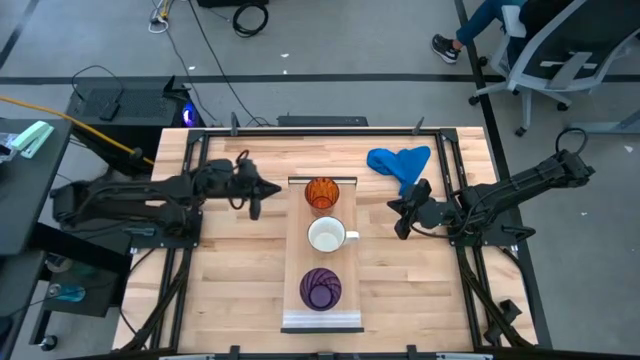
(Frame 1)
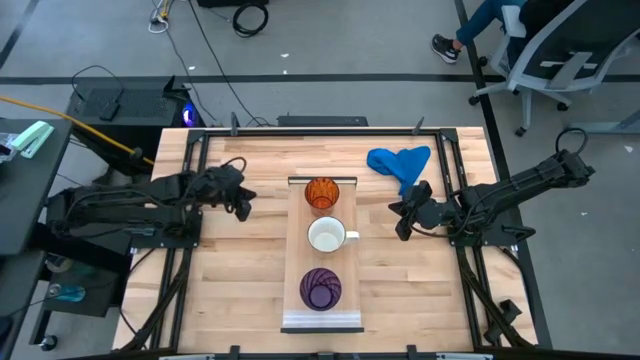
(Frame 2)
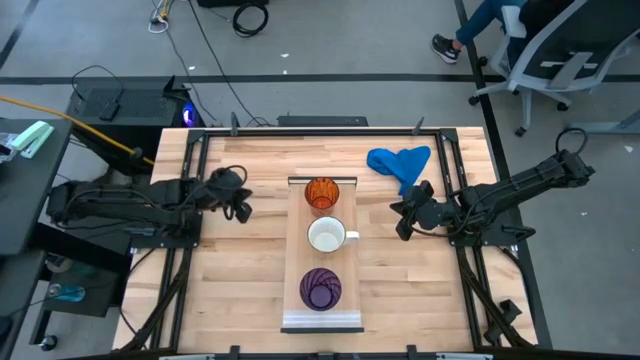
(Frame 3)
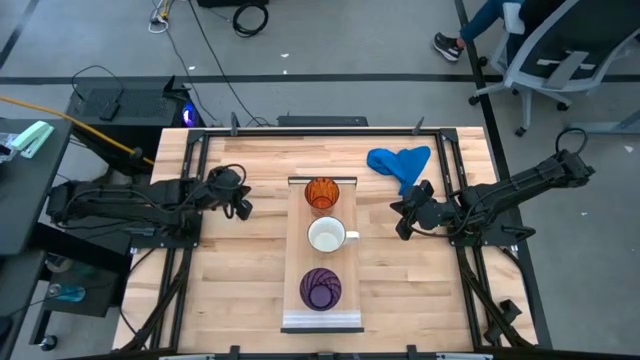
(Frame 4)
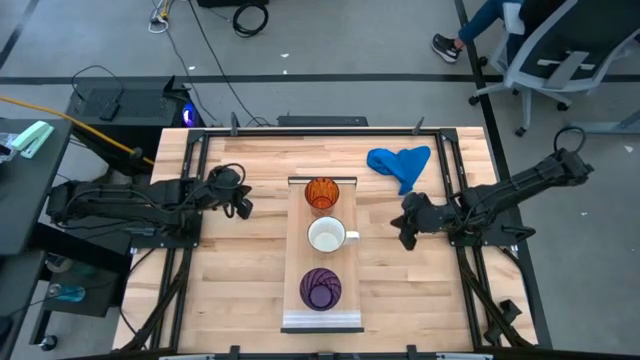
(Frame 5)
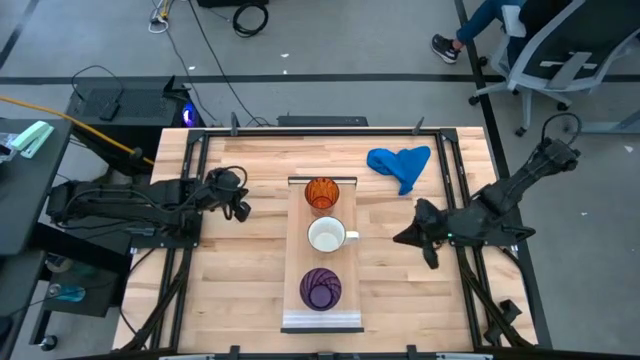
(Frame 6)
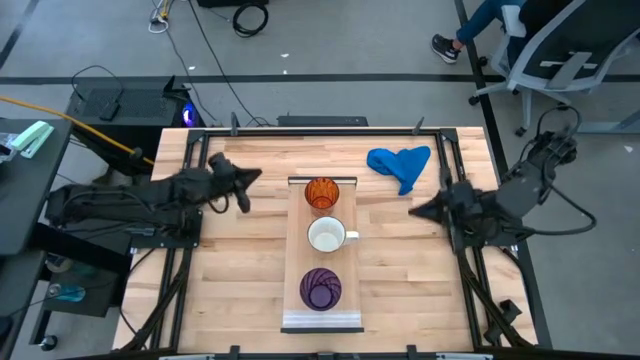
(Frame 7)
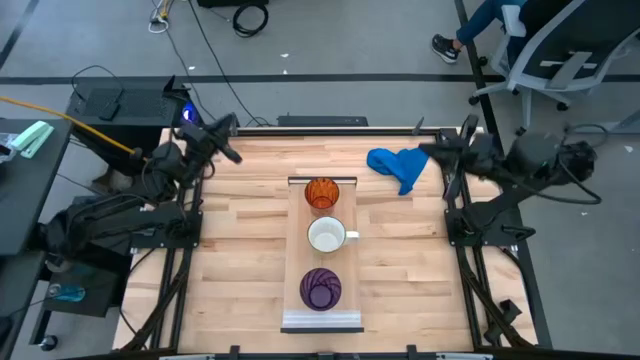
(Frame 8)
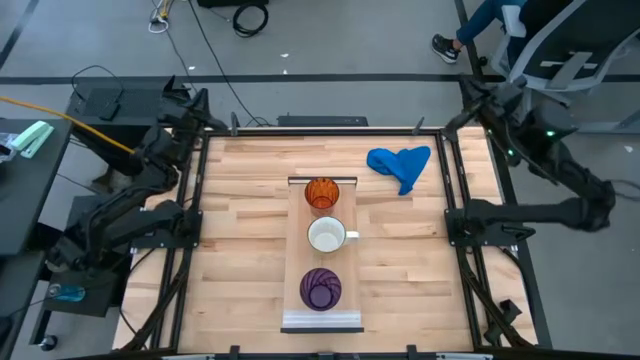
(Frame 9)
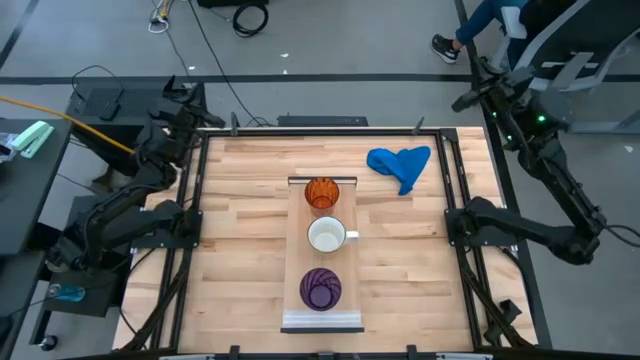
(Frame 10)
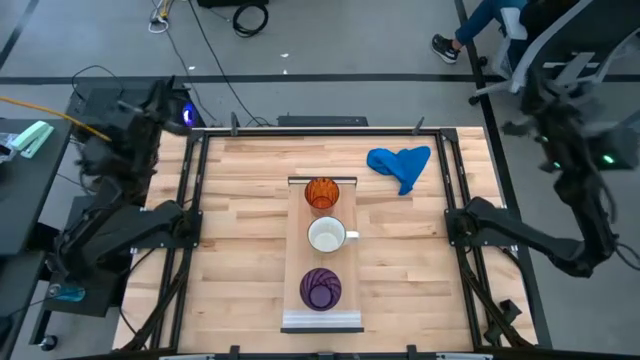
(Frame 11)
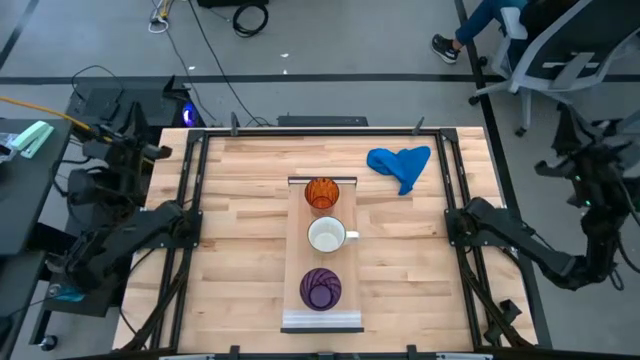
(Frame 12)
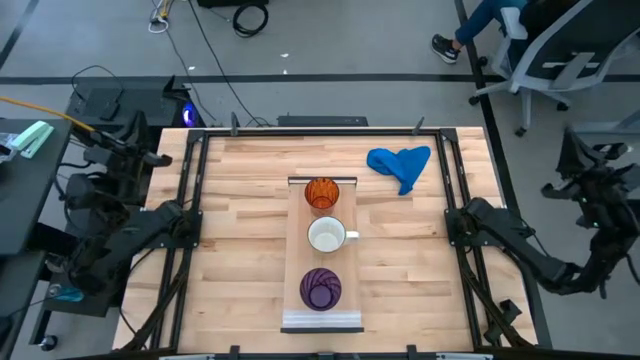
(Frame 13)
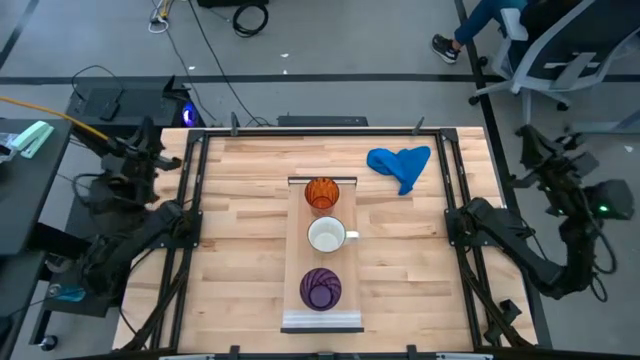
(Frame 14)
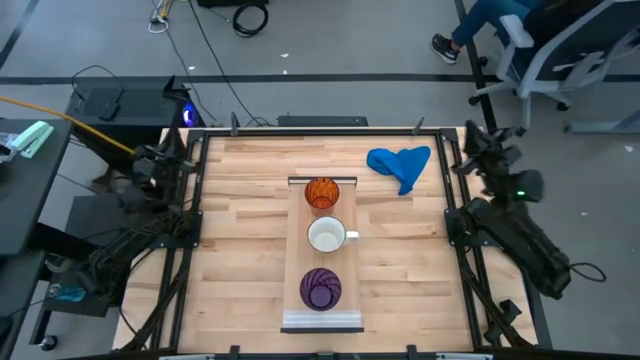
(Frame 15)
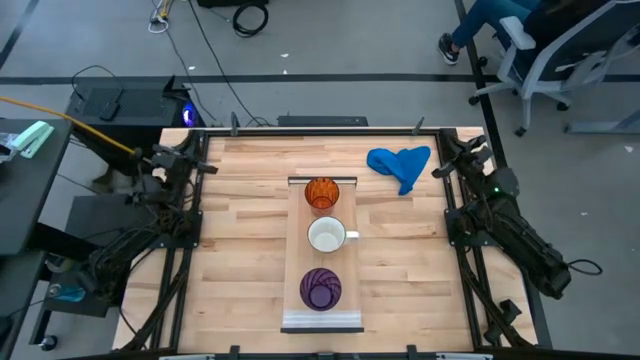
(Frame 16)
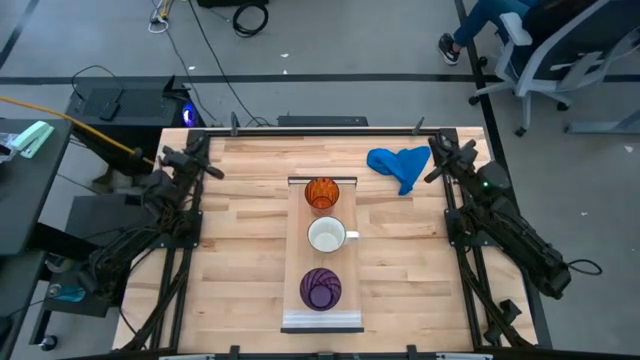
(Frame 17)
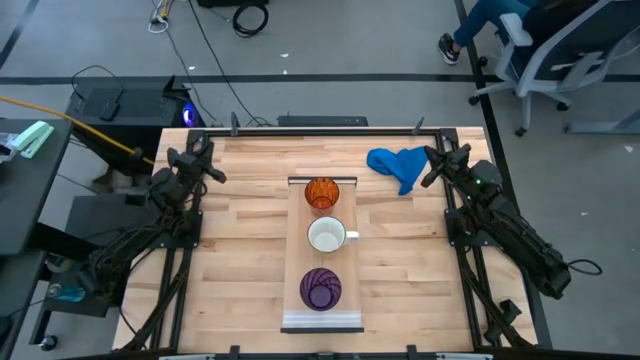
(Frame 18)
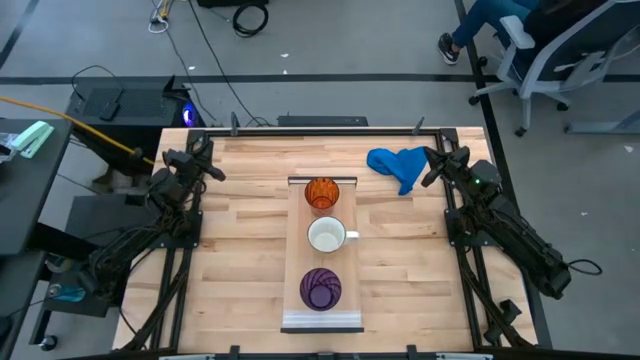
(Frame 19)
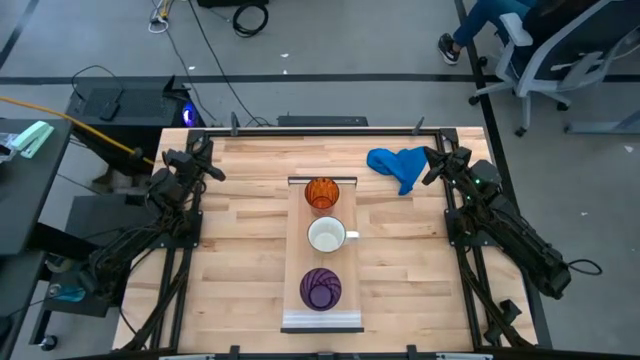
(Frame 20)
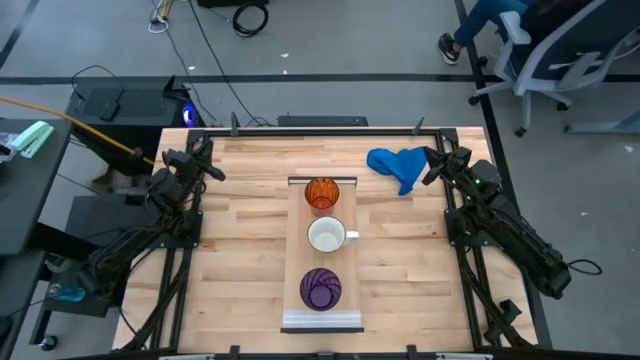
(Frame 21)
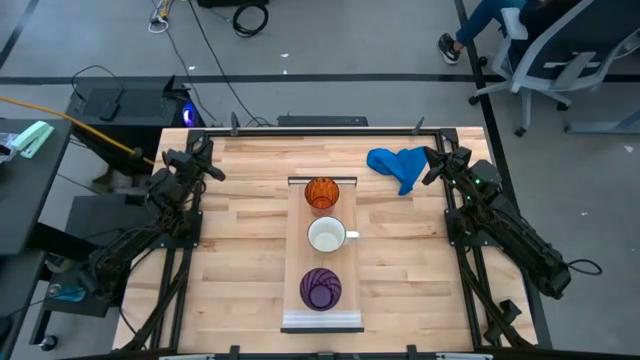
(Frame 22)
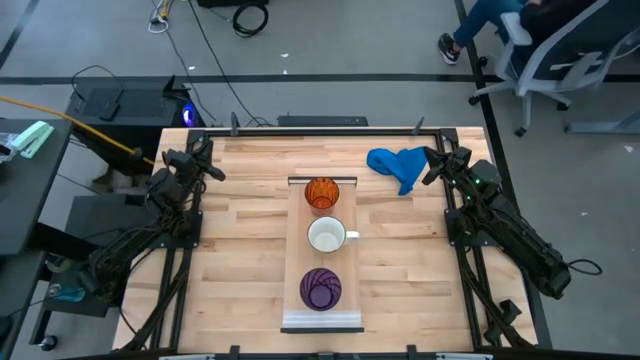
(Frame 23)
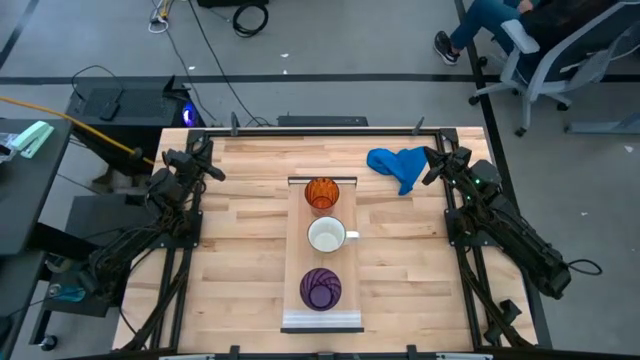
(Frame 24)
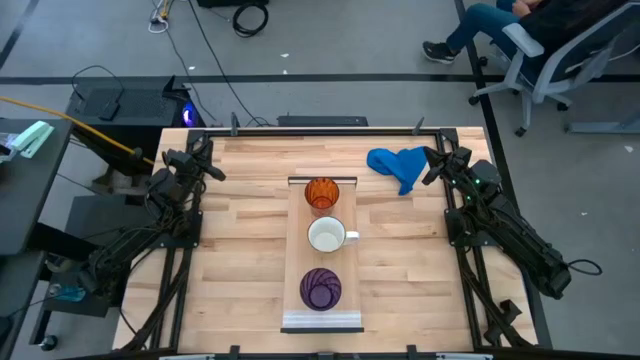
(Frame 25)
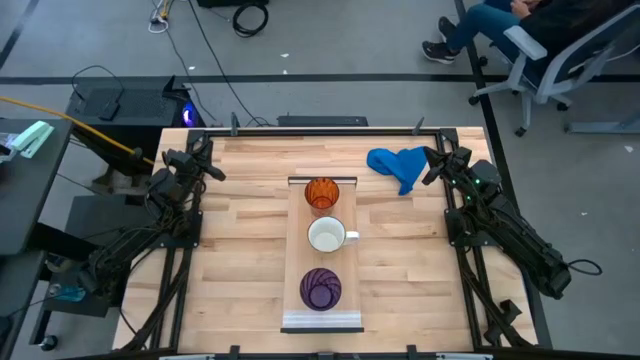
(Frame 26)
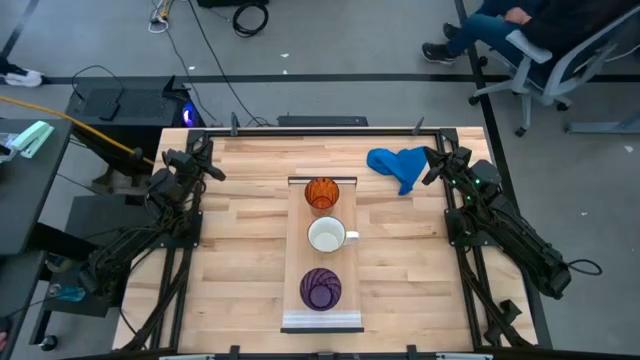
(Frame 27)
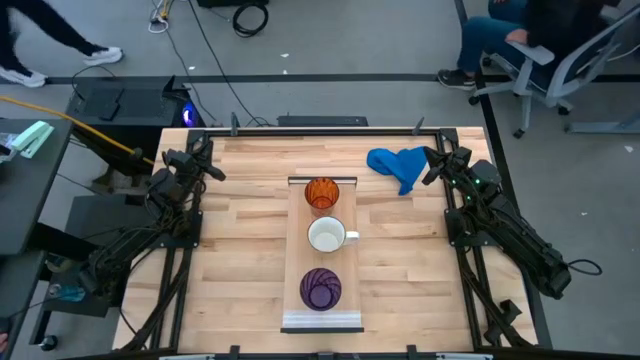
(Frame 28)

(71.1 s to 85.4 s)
Task: Stack small to large cups/mugs on shelf
Return to Home Position

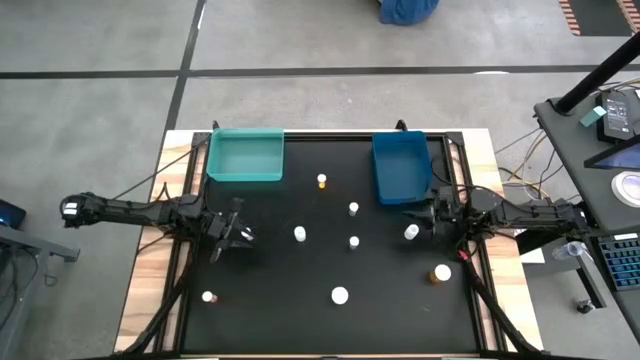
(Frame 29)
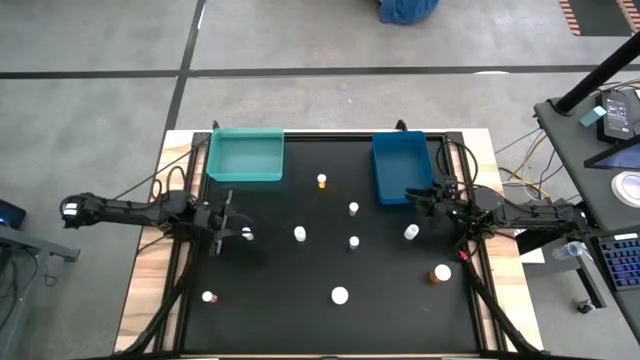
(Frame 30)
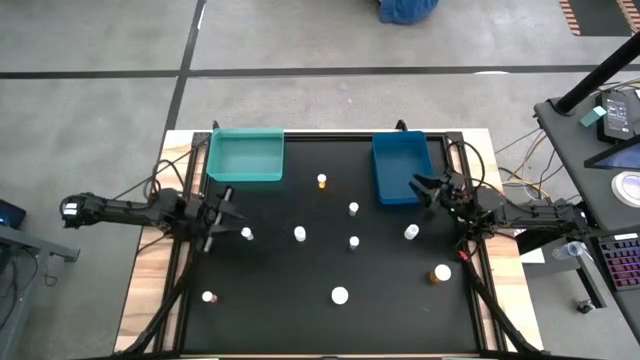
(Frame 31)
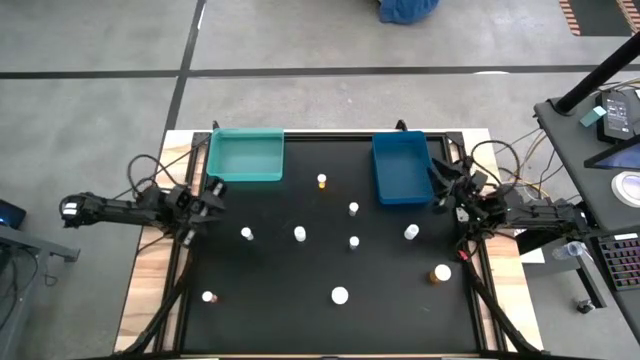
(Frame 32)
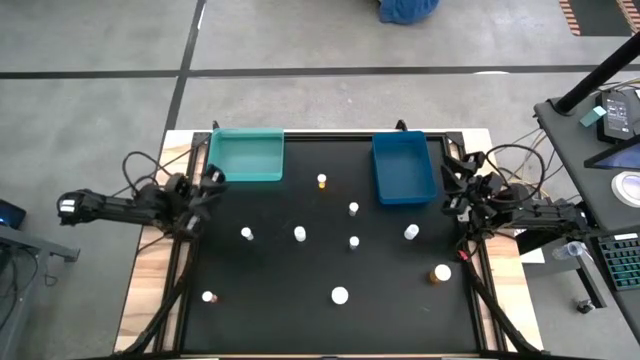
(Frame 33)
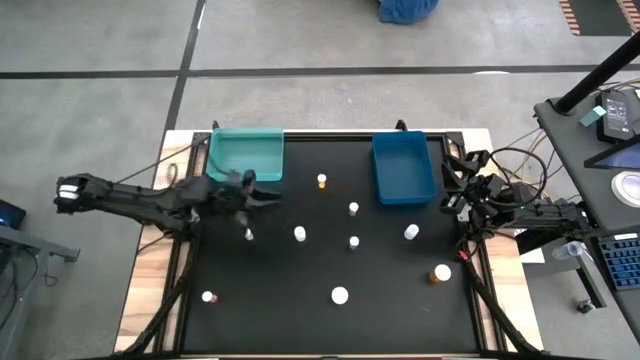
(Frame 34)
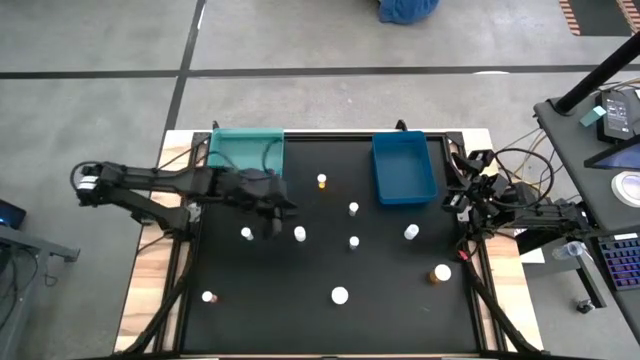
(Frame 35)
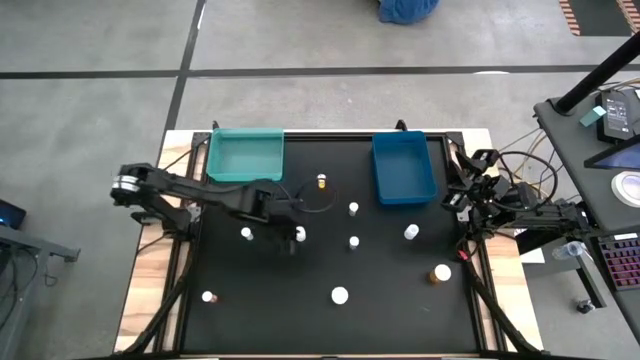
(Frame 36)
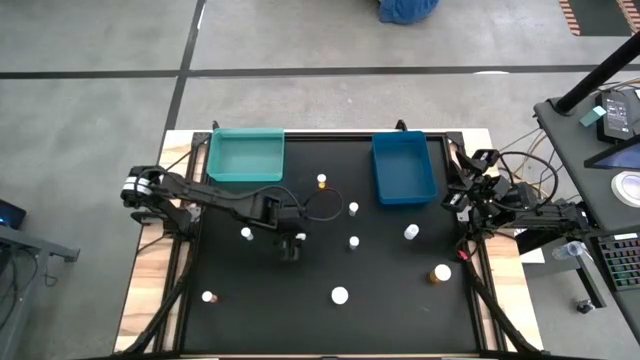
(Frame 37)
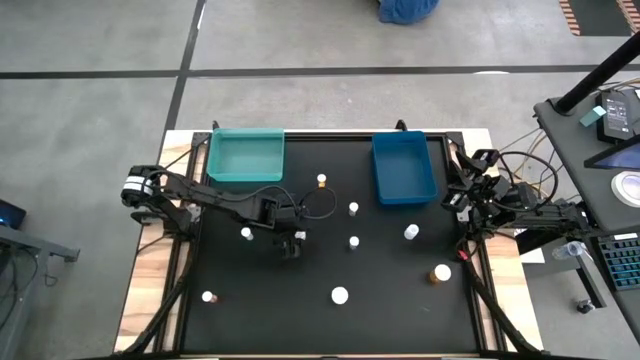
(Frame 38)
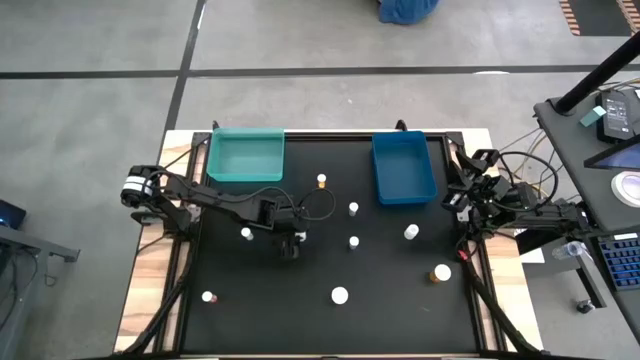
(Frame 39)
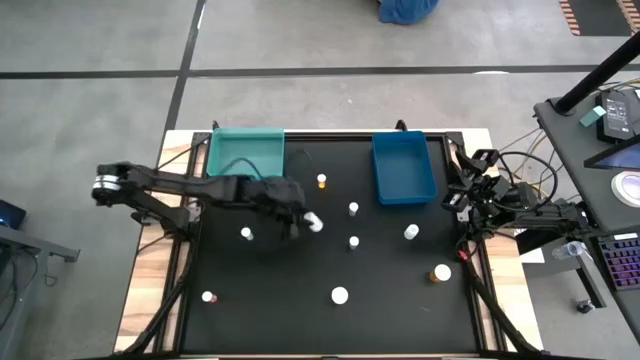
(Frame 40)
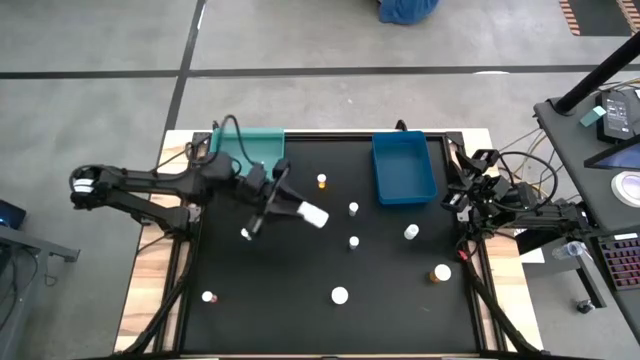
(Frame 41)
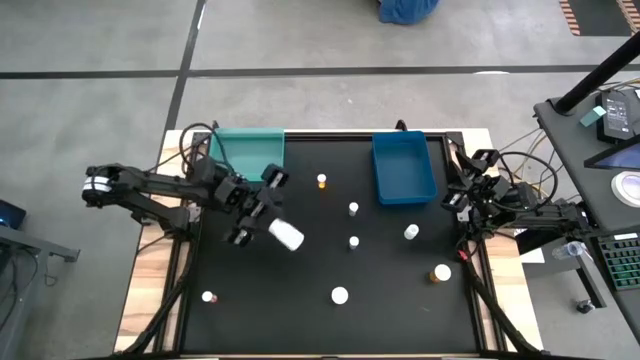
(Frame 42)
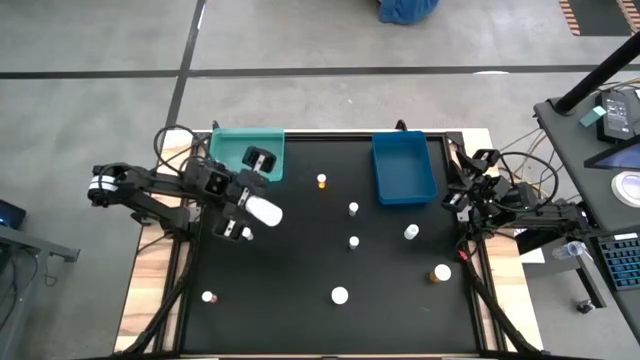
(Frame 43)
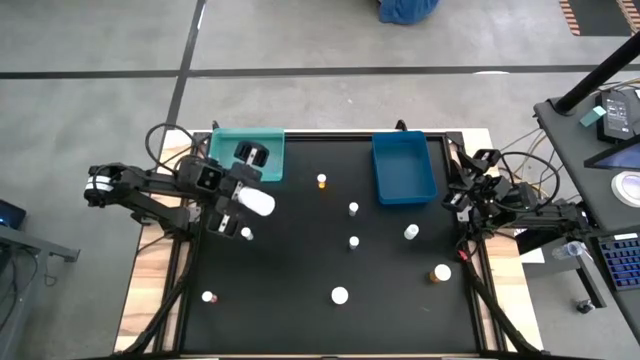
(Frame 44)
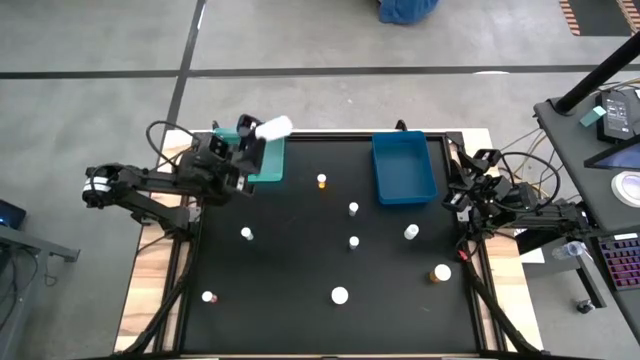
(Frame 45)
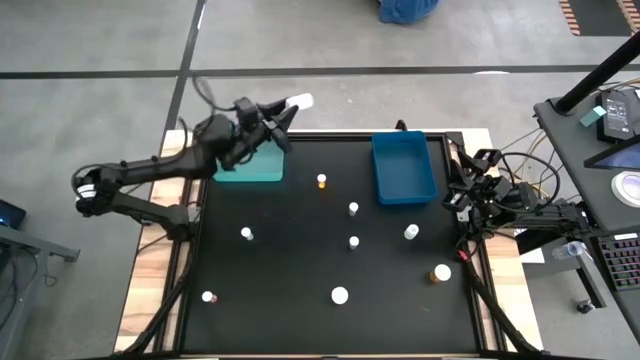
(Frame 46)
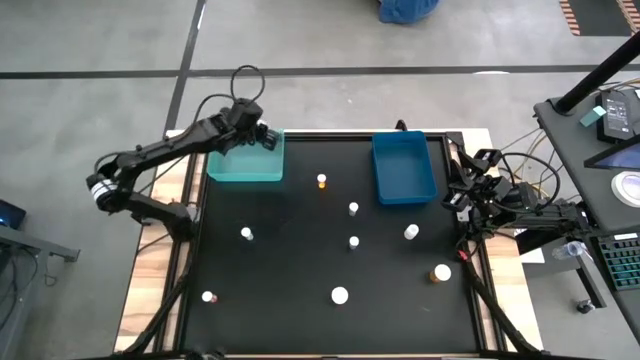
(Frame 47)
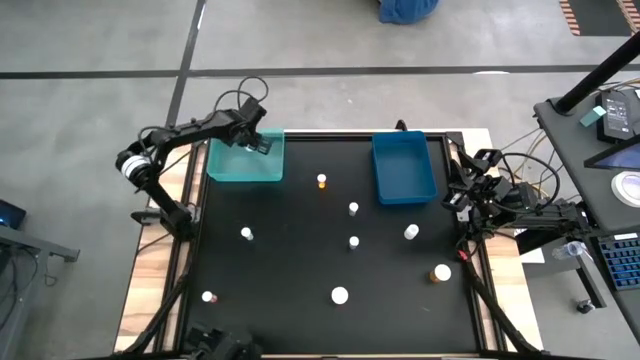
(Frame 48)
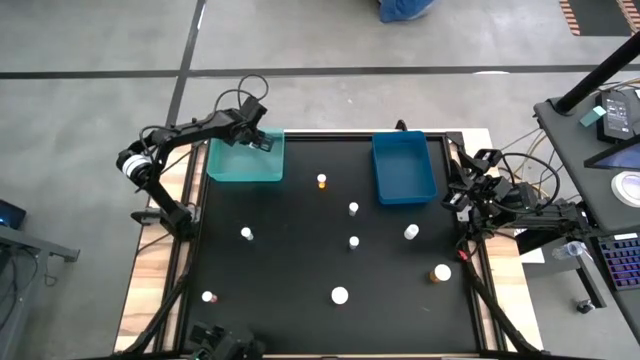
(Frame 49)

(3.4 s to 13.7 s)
Task: Pick and place medicine bottles into bin by pill shape (circle, oval)
Put the white capsule bottle into the light blue bin
